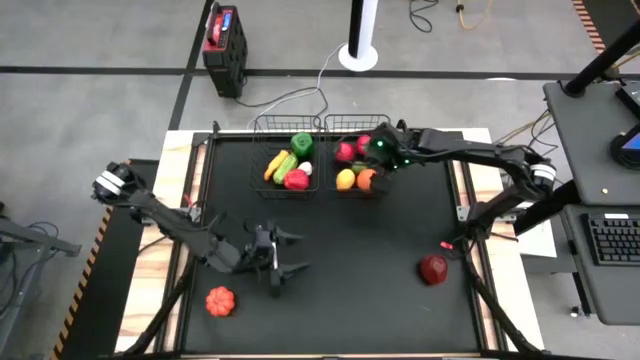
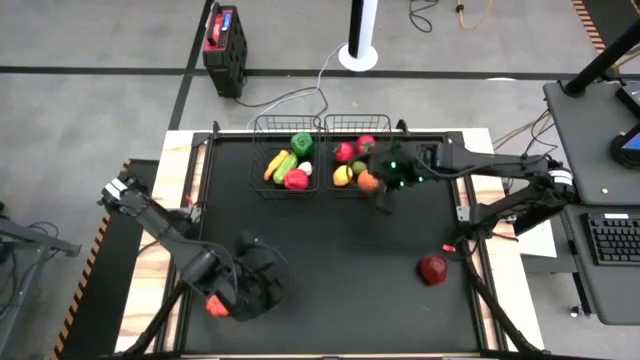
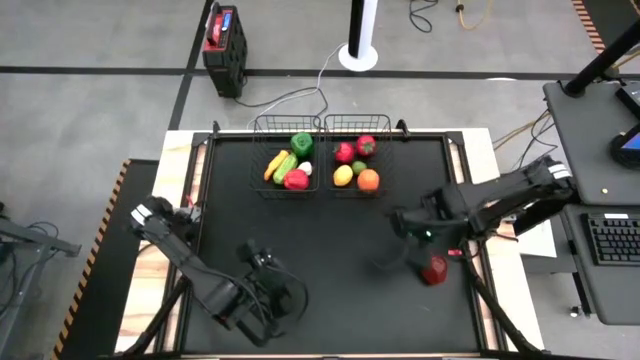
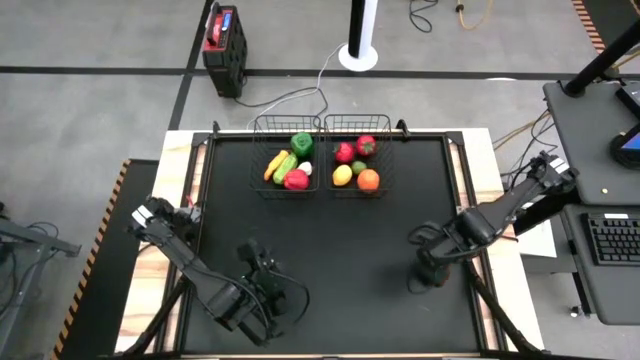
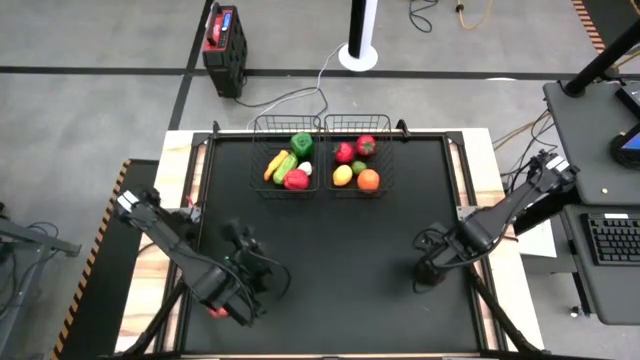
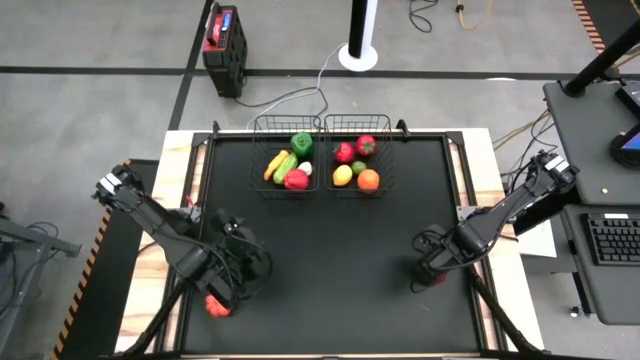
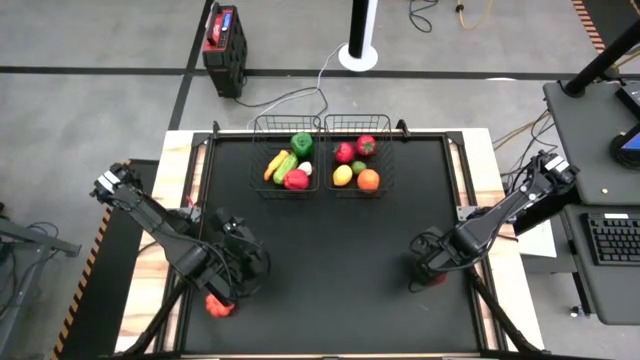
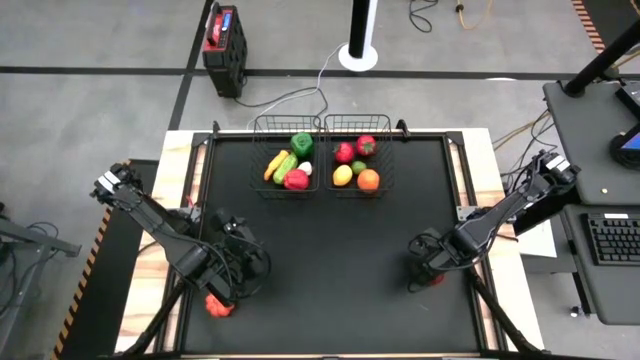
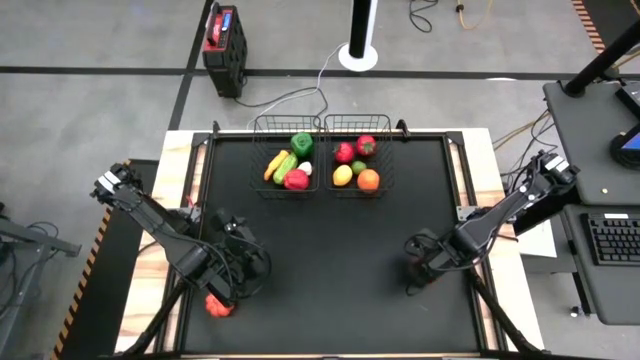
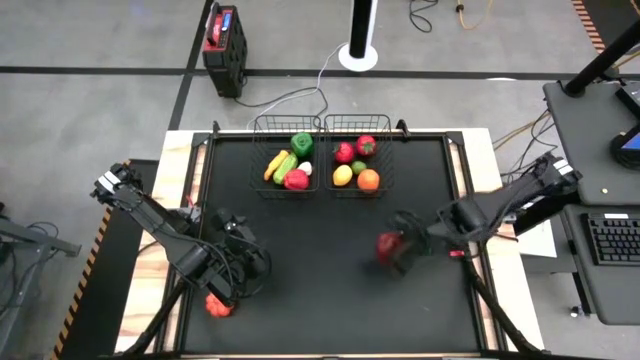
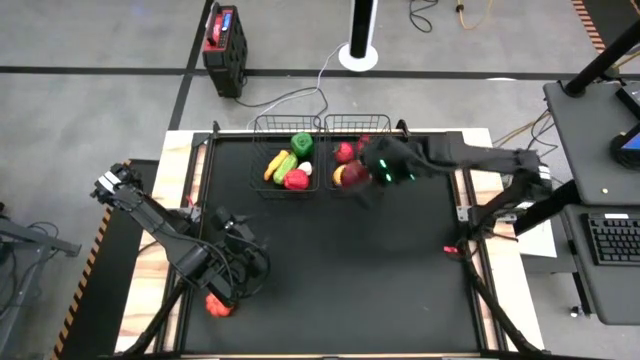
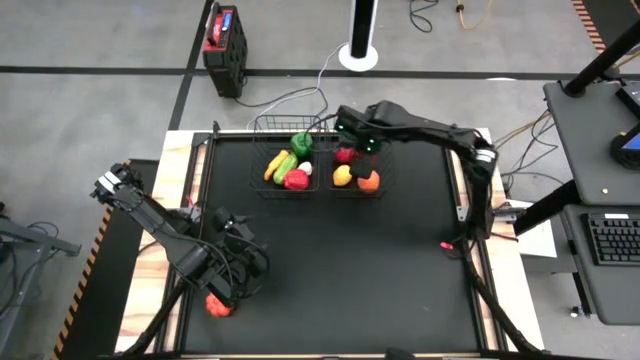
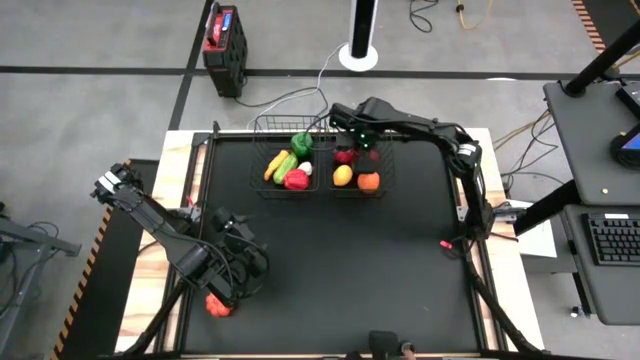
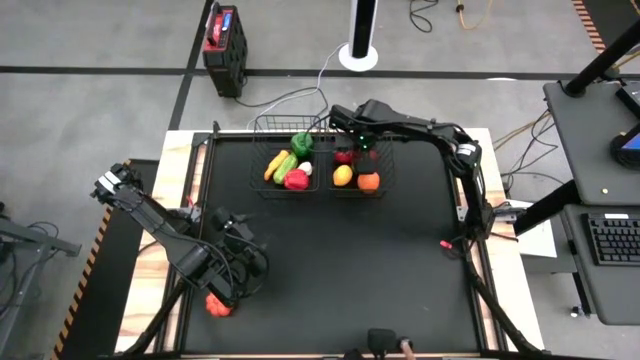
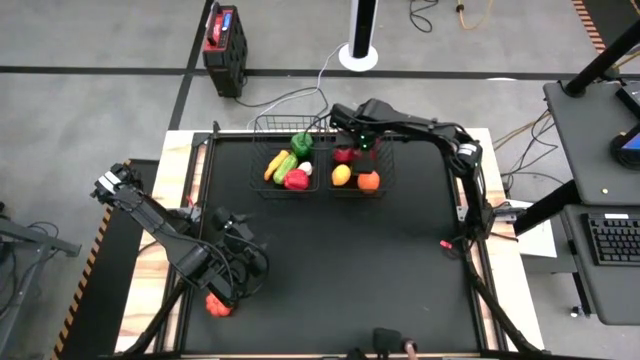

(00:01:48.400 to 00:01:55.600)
Task: Sort produce into baskets
Put the apple into the right wire basket

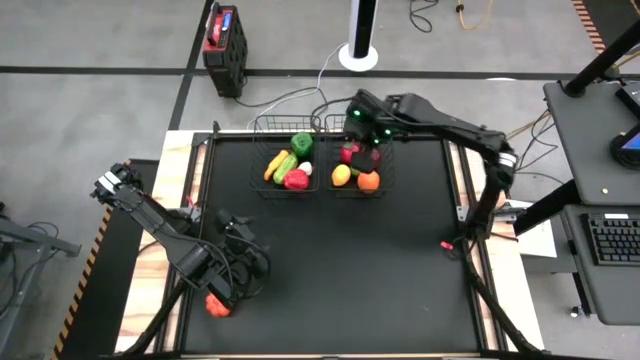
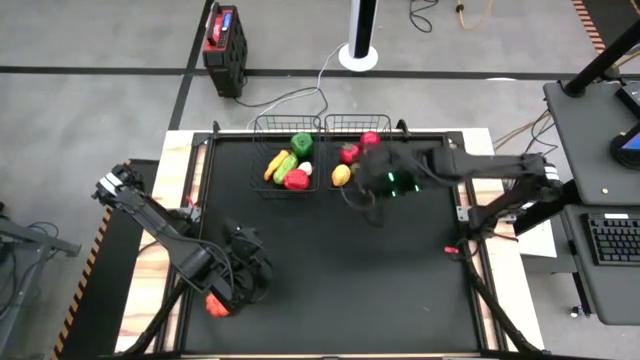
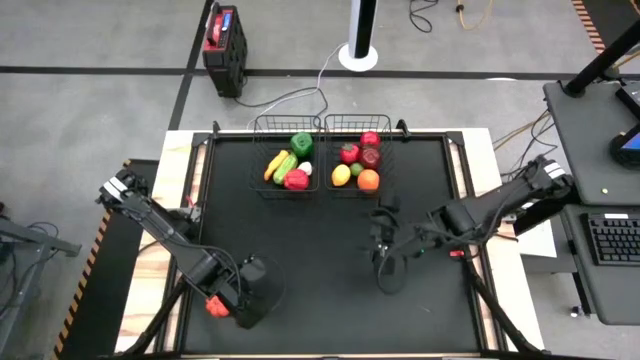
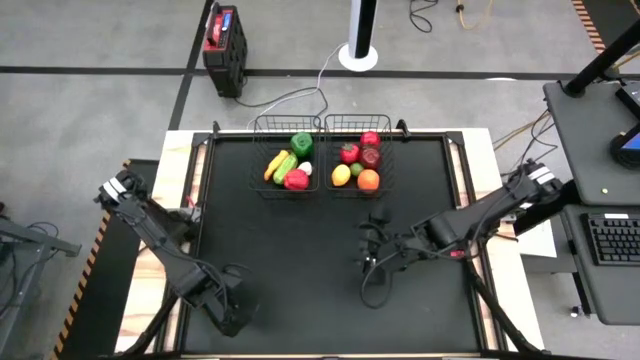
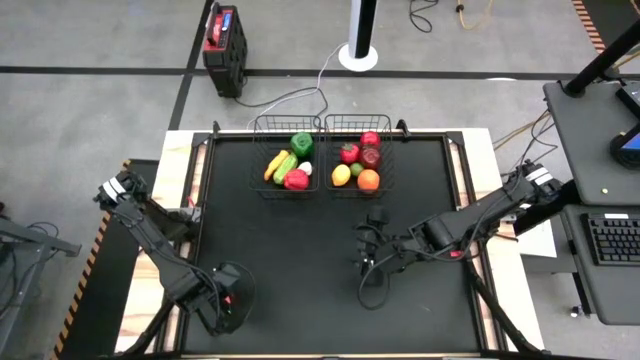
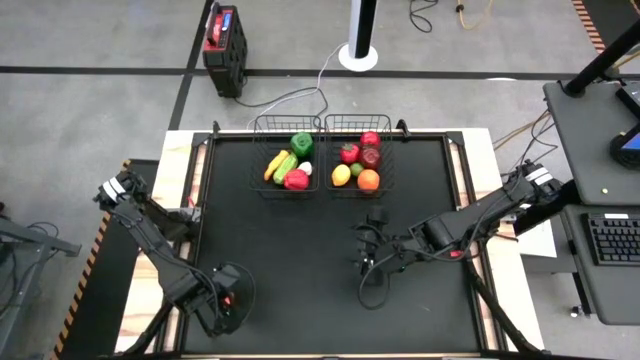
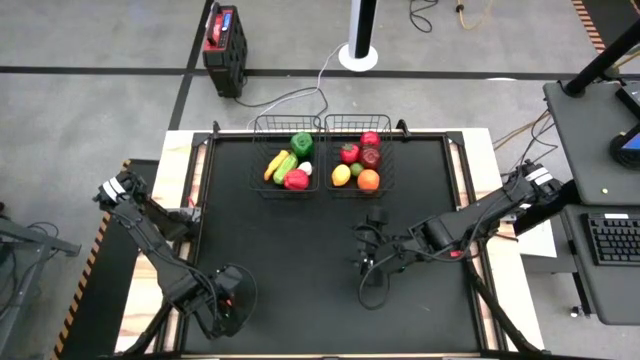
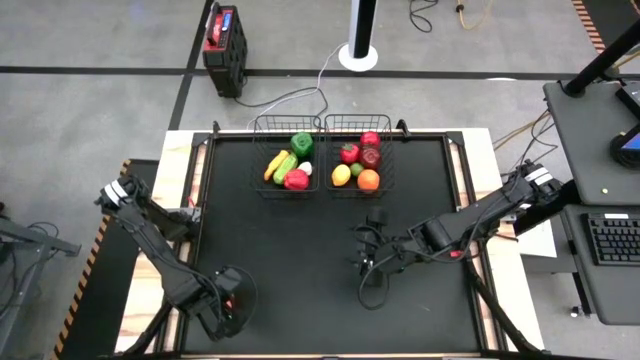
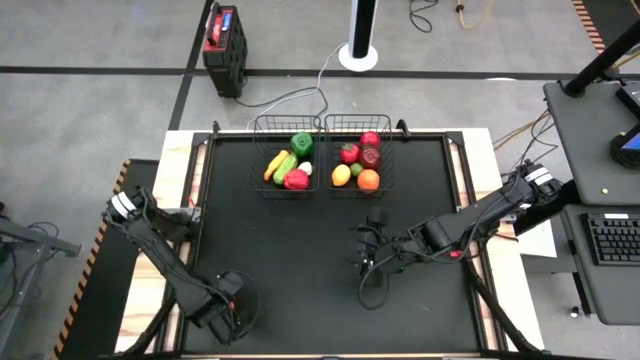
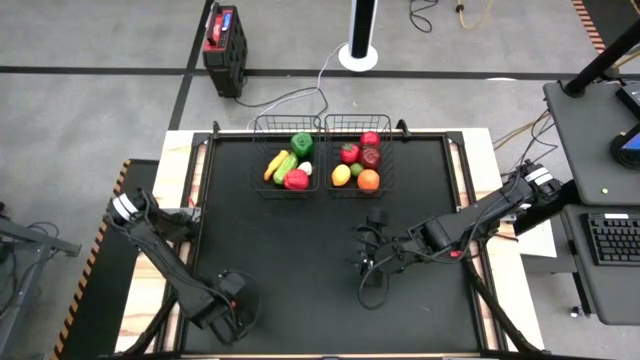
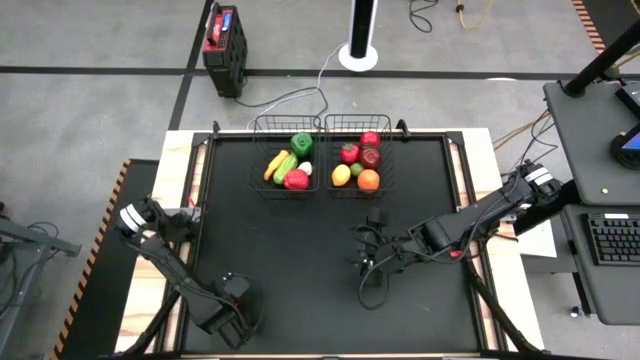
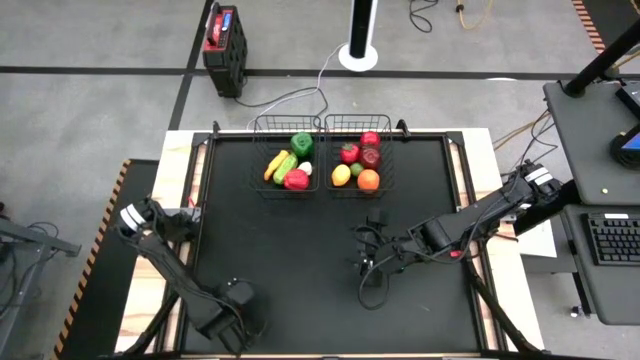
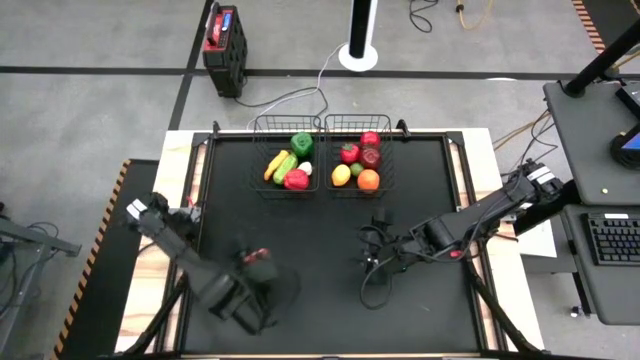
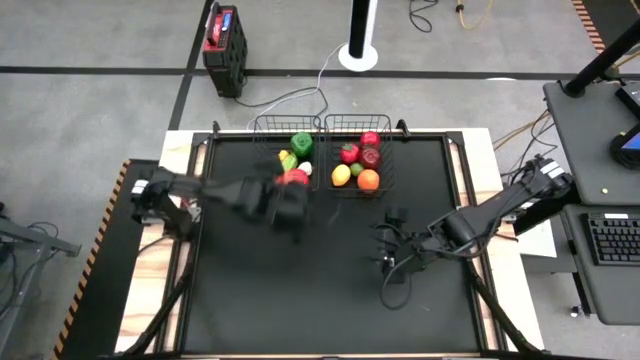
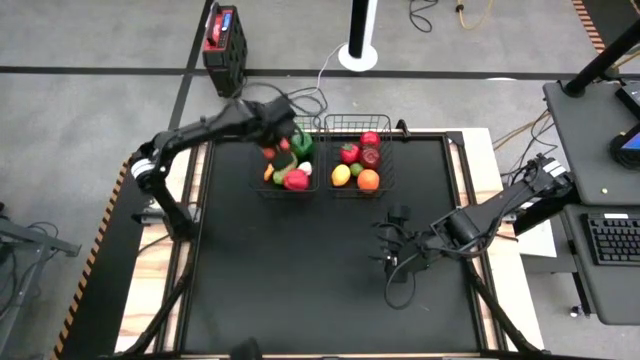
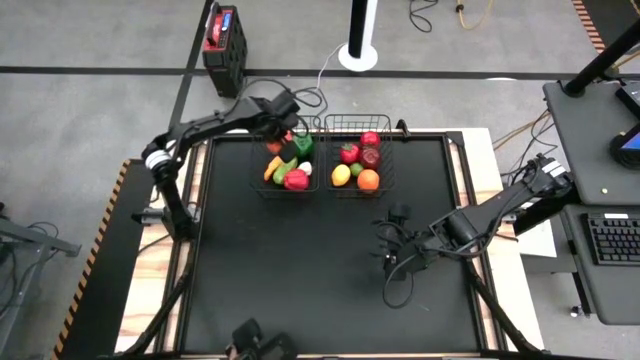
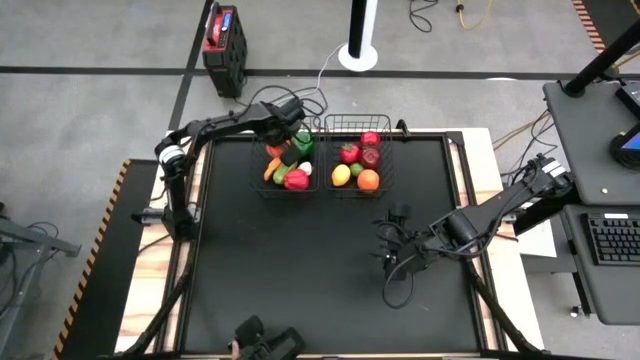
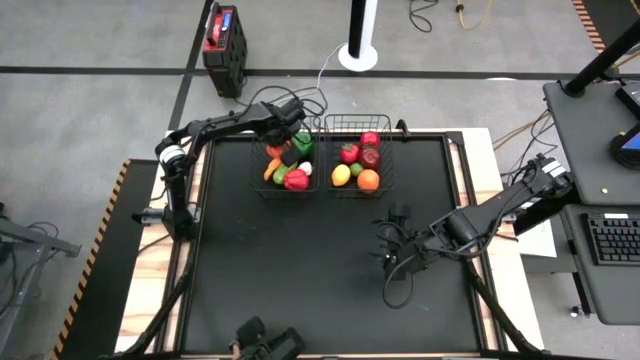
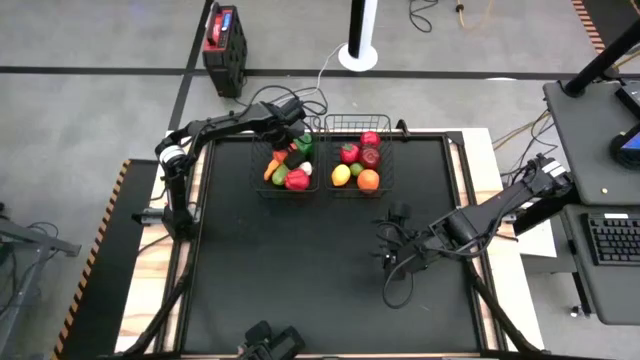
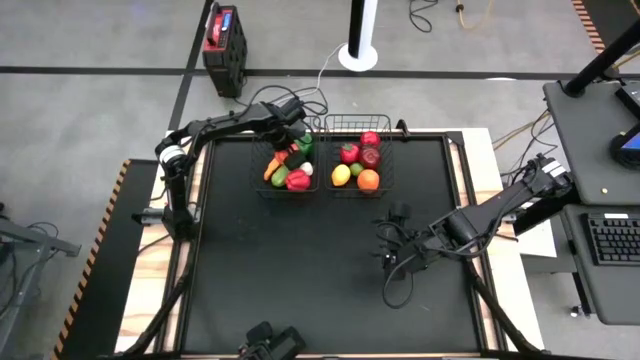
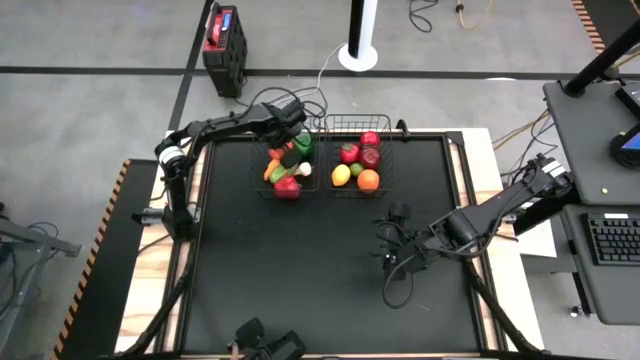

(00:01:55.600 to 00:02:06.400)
Put the pumpkin into the left wire basket

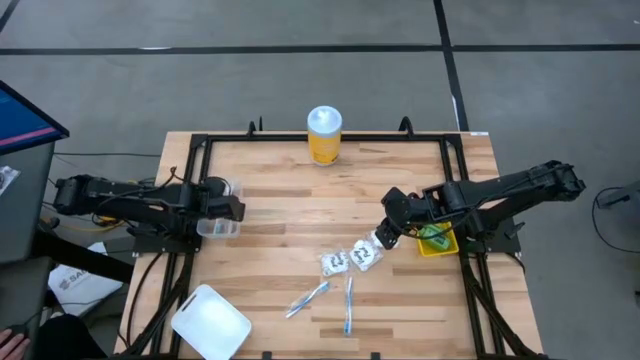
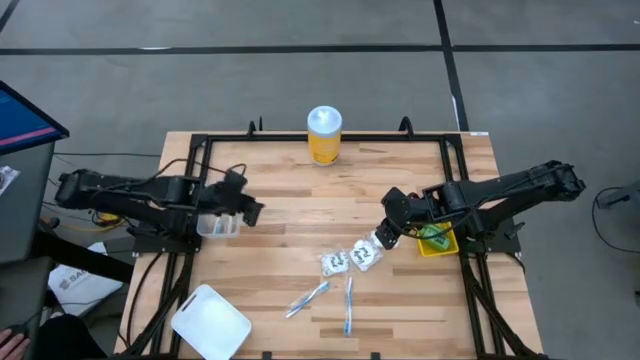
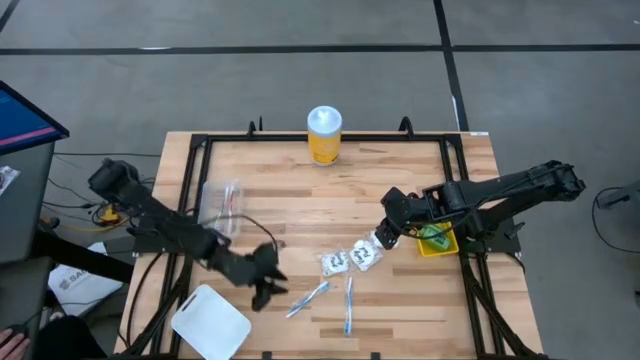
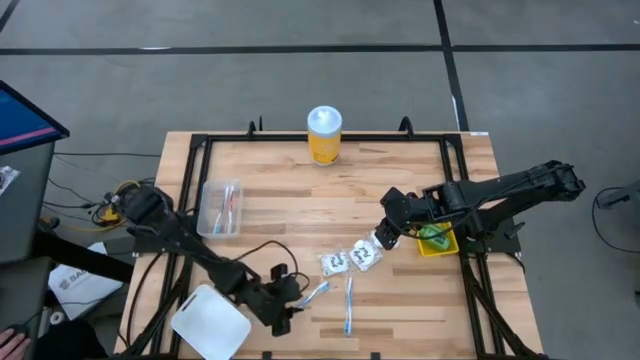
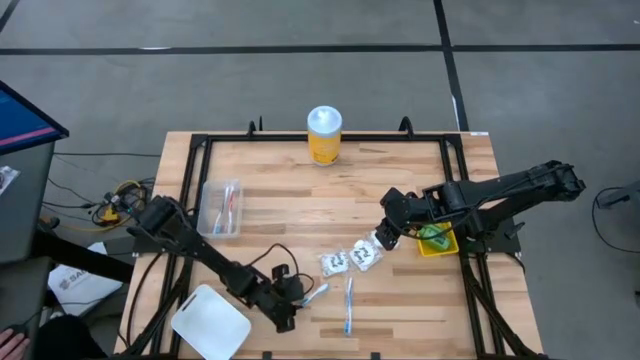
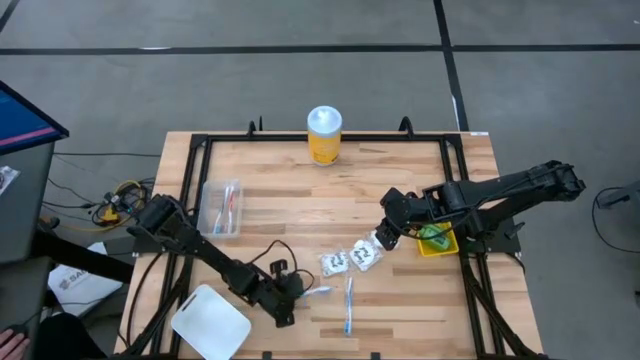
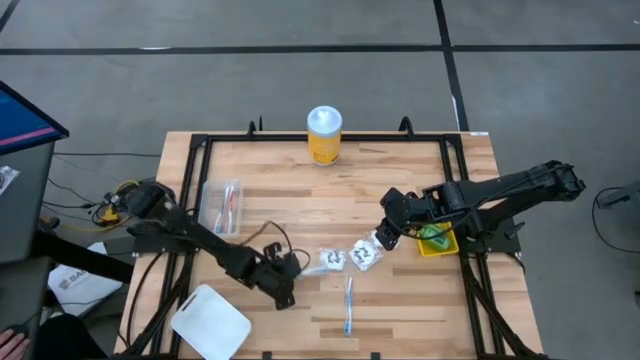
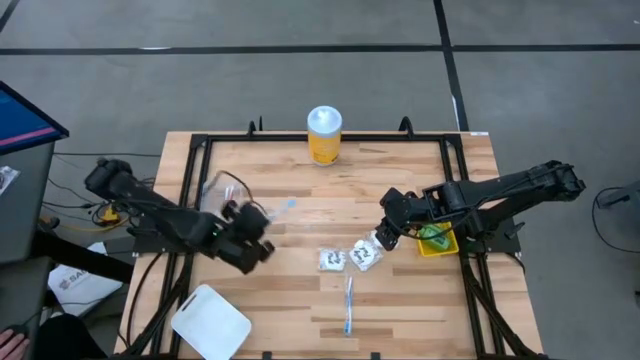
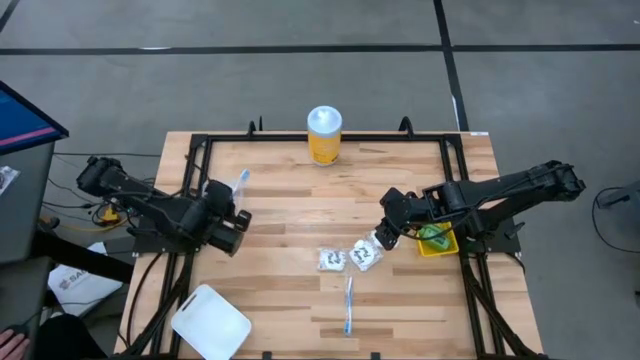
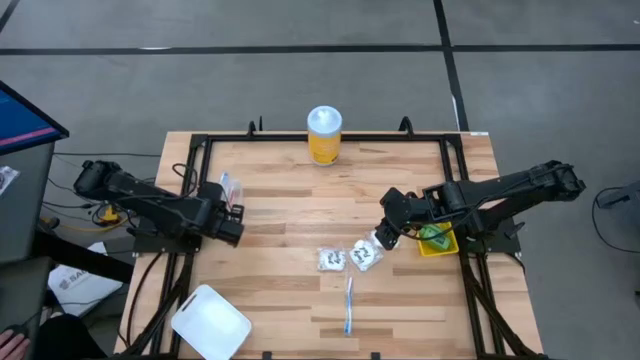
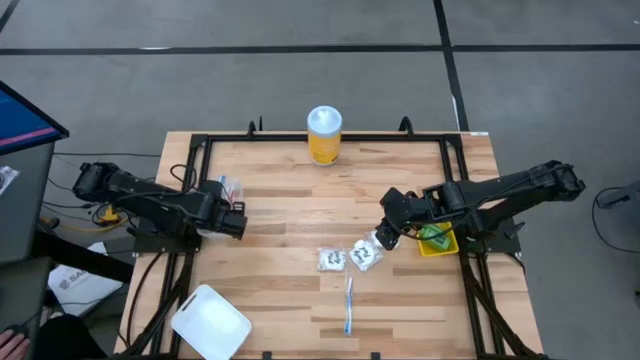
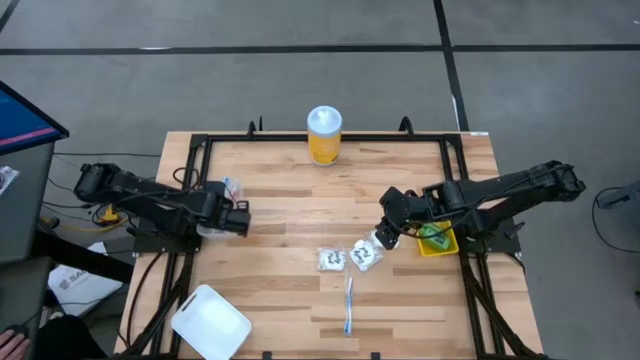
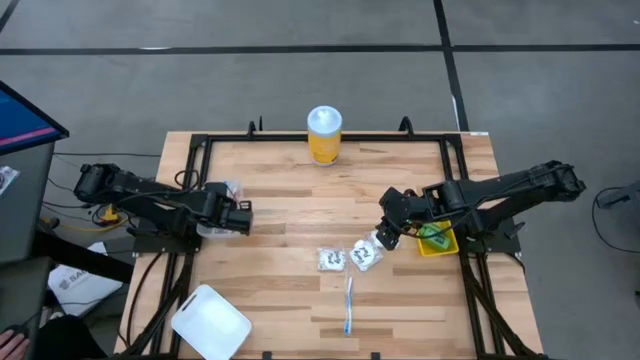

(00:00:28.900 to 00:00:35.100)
Task: Pick & Place Travel size toiletries
Put the left blue toothbrush into the transparent bin
